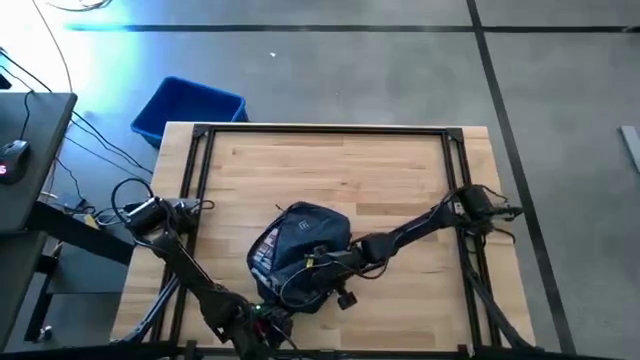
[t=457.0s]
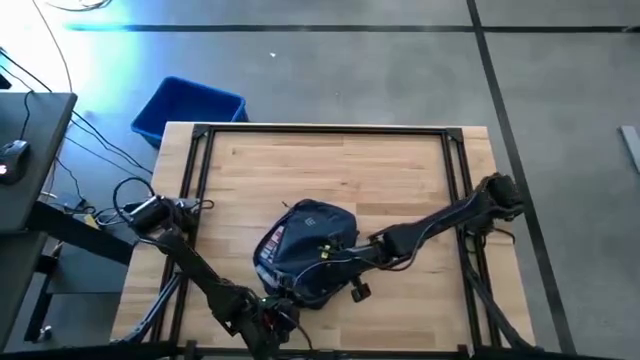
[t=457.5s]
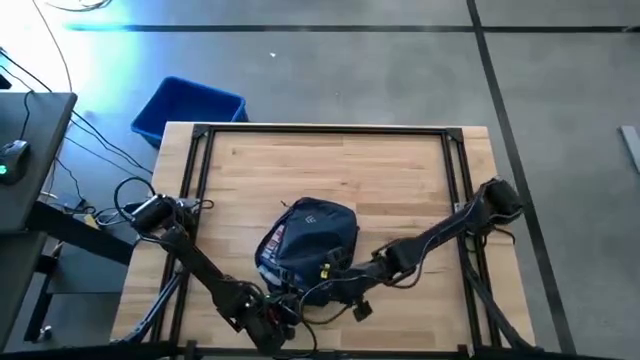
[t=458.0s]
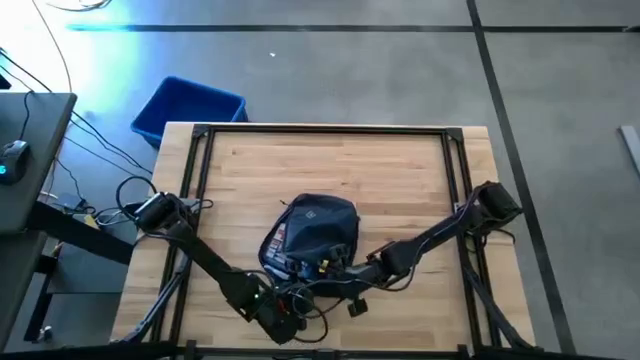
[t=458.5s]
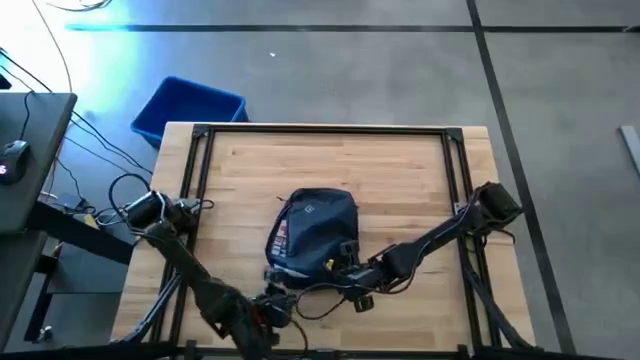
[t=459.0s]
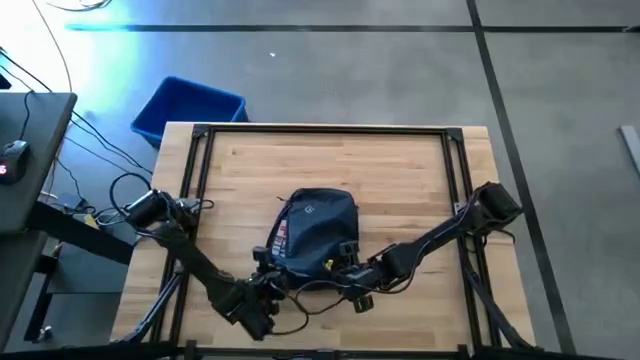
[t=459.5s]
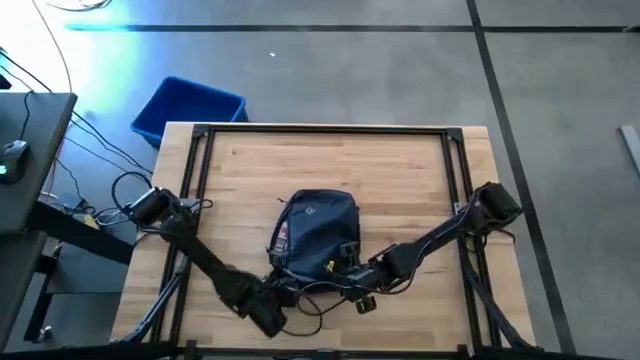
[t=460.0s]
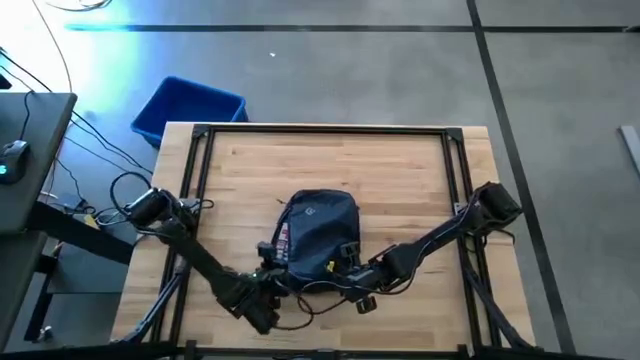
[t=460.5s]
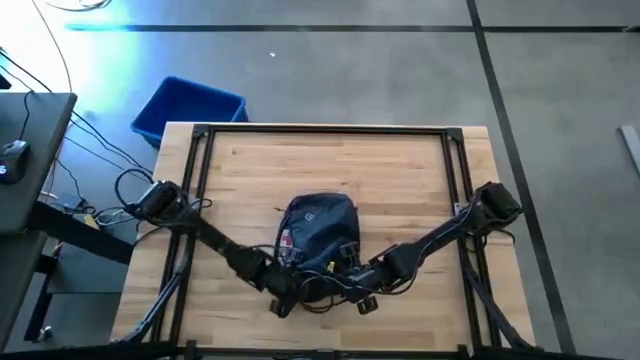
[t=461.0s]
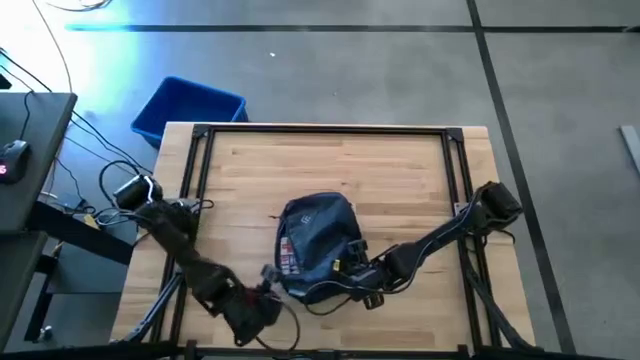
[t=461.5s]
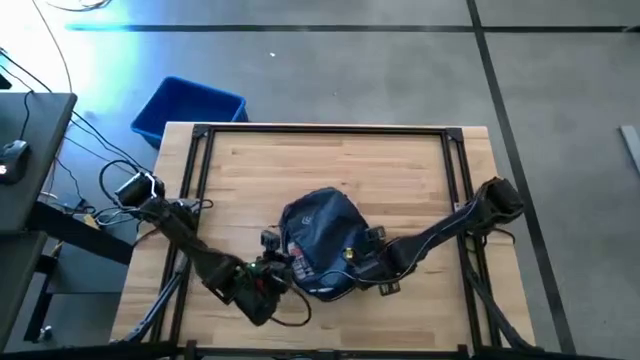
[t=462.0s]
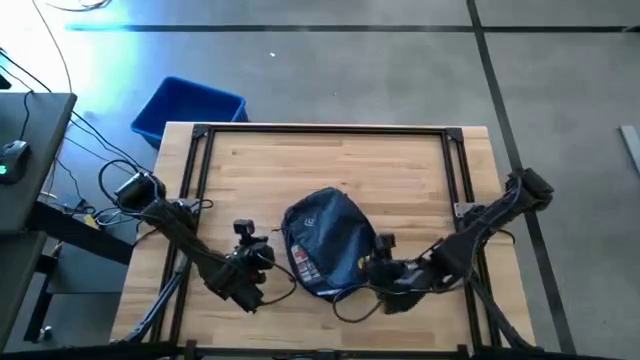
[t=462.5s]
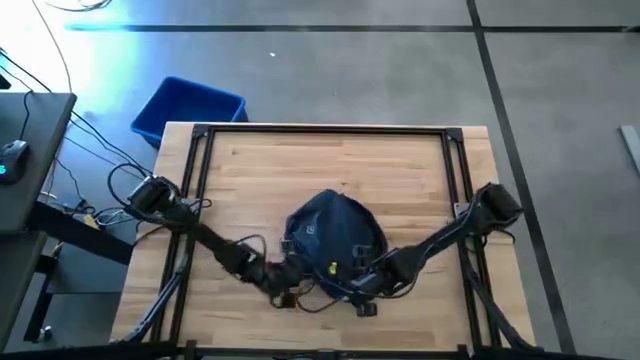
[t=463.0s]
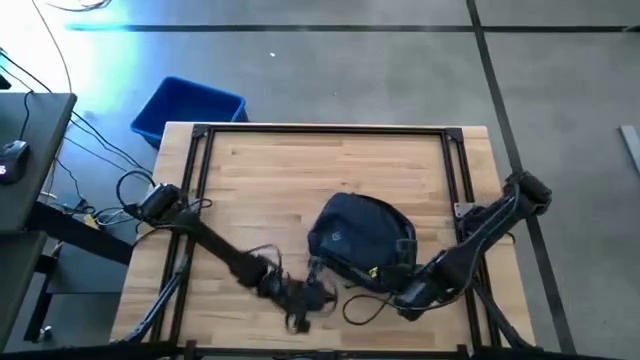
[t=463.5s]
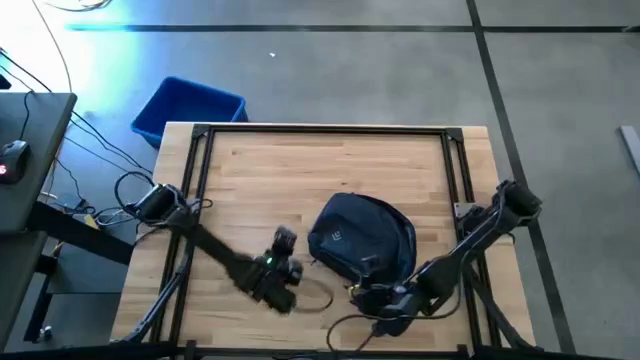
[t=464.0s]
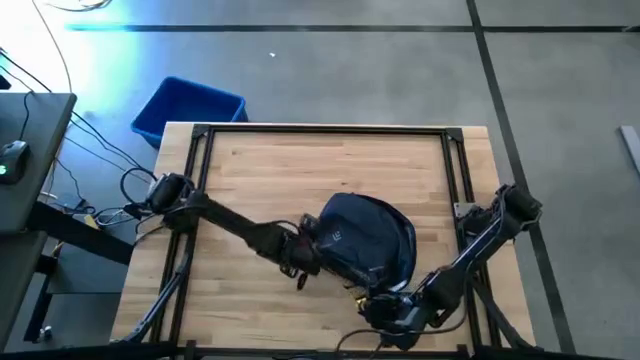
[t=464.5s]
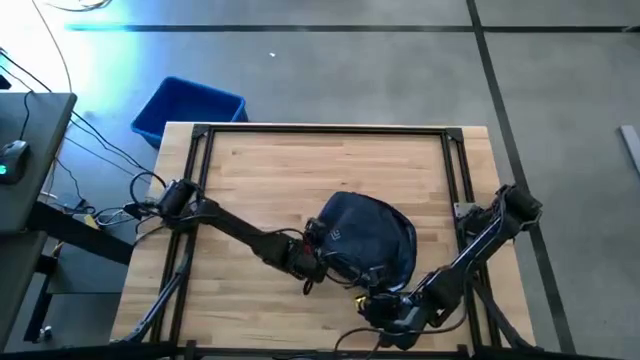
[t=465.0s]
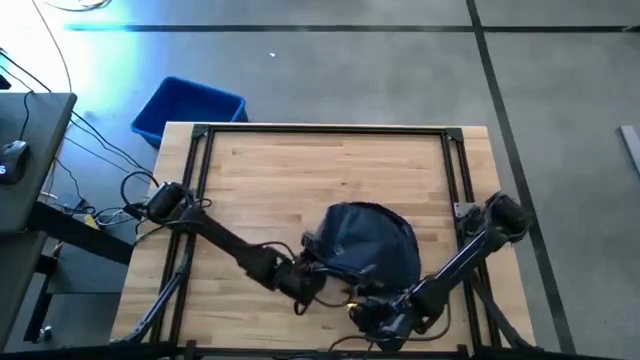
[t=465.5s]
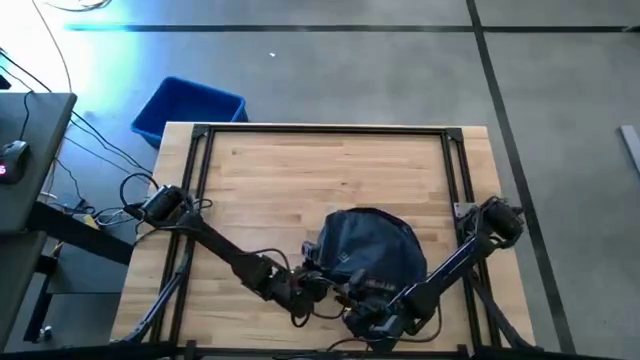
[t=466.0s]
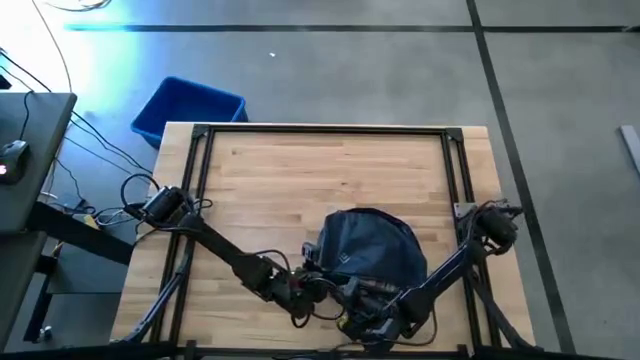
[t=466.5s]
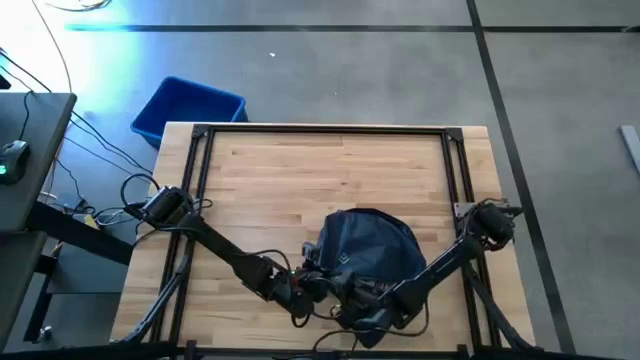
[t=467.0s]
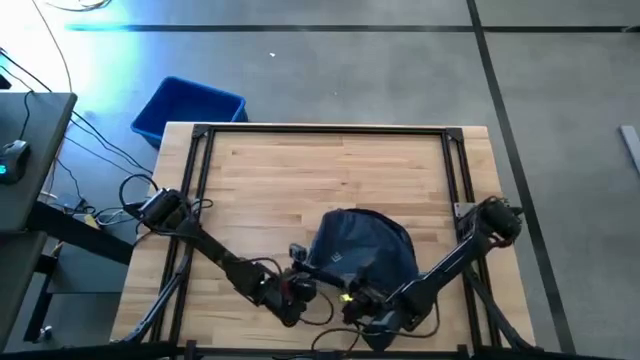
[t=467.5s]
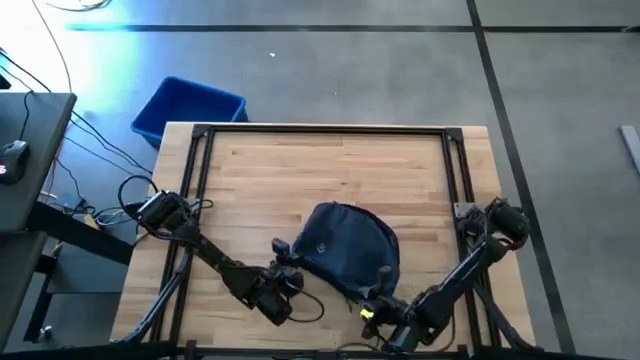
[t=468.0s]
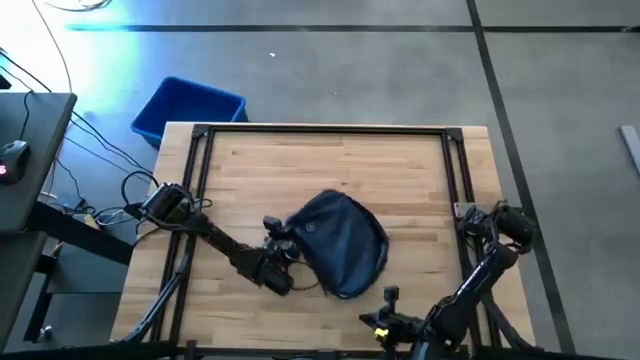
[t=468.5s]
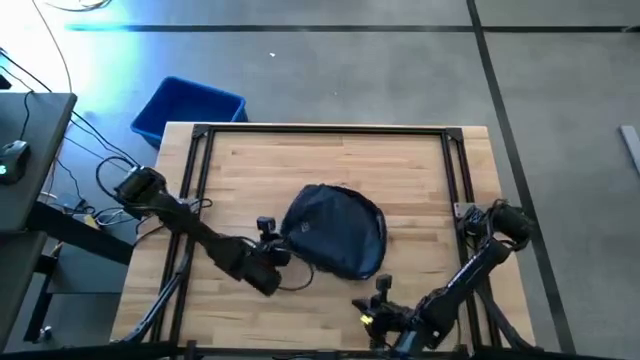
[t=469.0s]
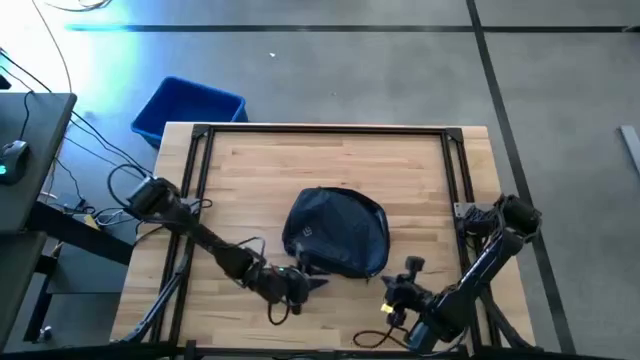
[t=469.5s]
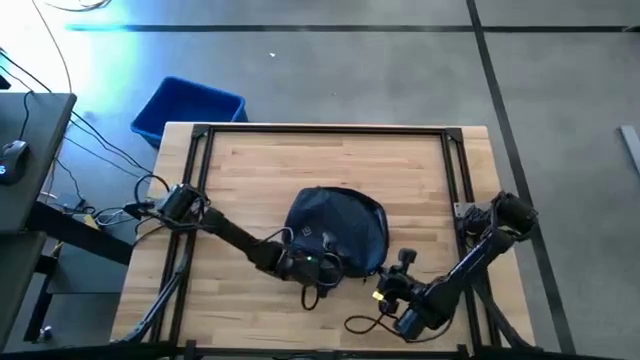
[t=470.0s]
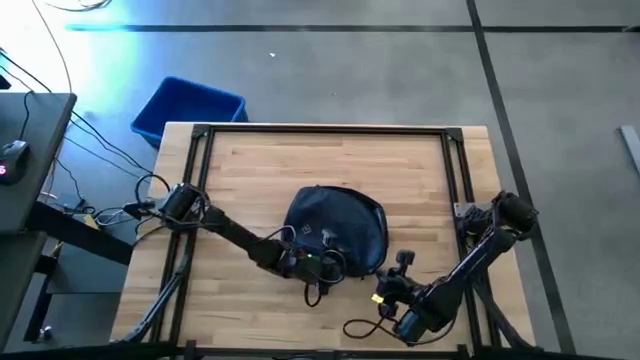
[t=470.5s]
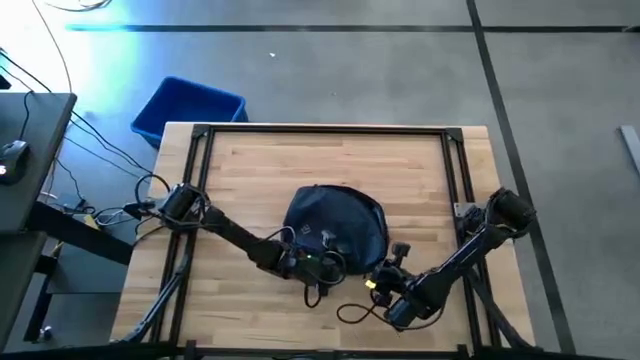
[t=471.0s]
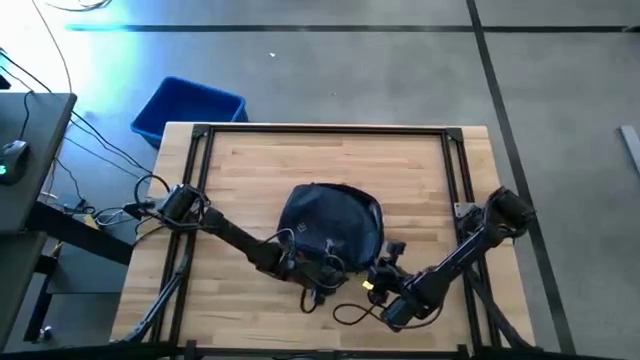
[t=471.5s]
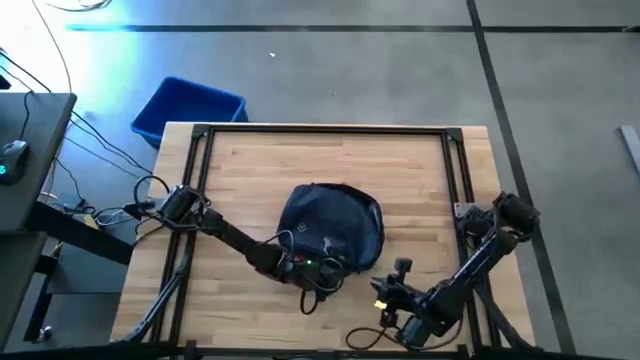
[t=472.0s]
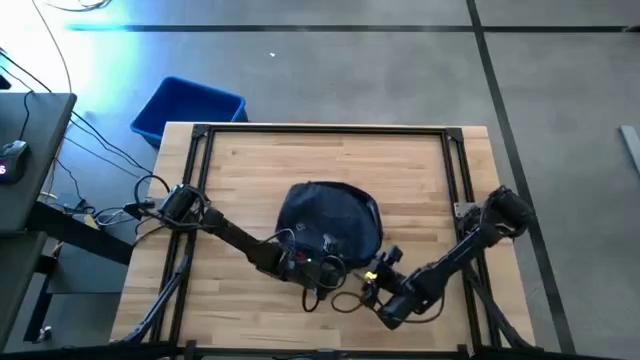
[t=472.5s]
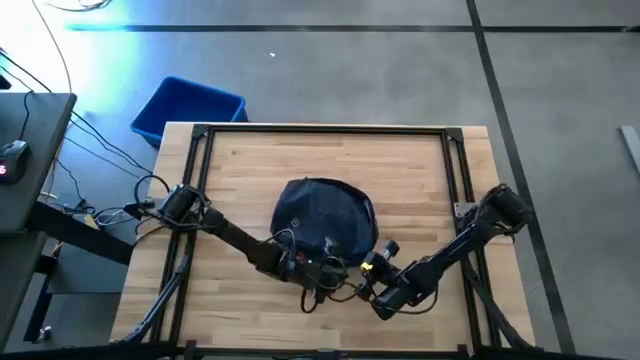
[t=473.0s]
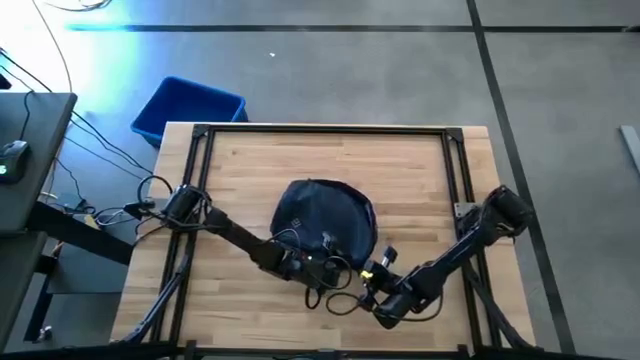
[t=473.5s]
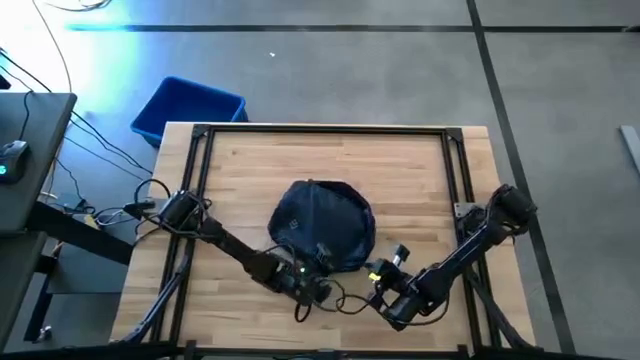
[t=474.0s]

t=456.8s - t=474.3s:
Task: Unpack backpack
Close the backpack

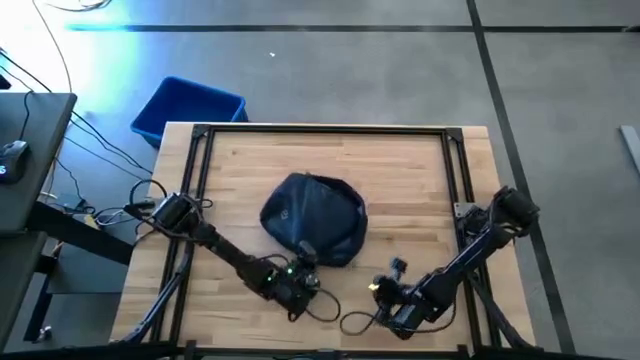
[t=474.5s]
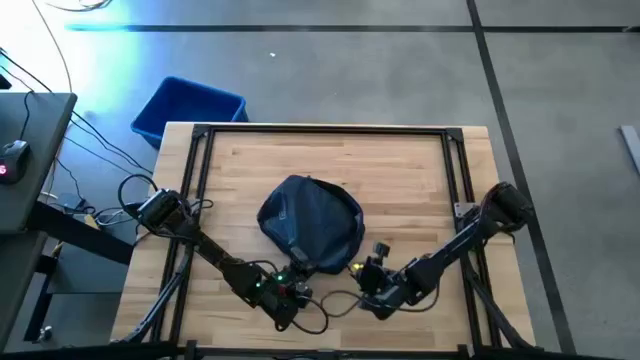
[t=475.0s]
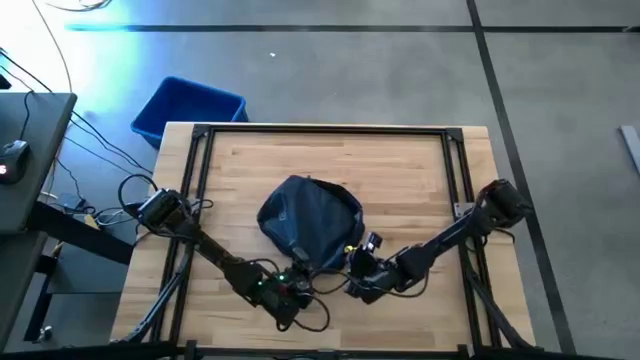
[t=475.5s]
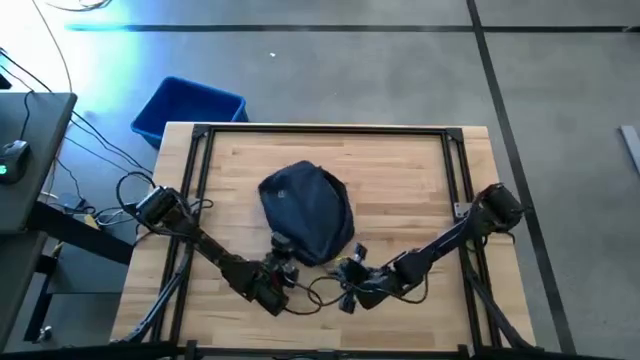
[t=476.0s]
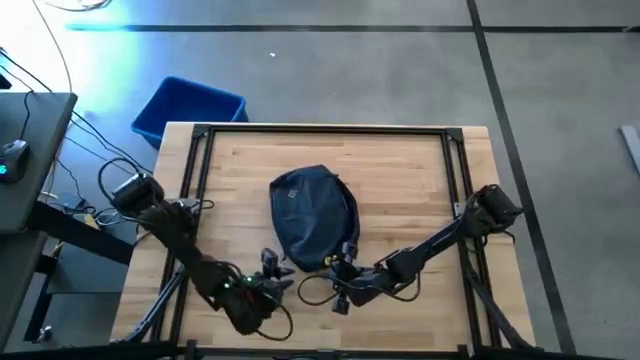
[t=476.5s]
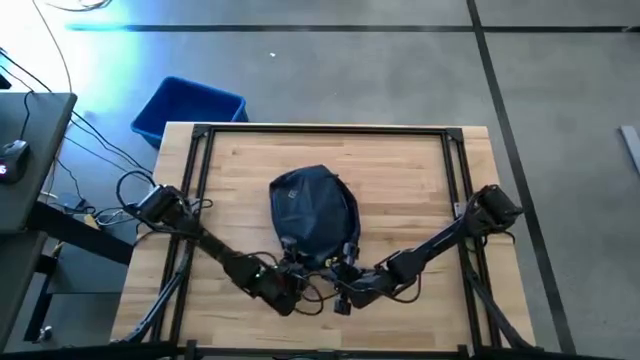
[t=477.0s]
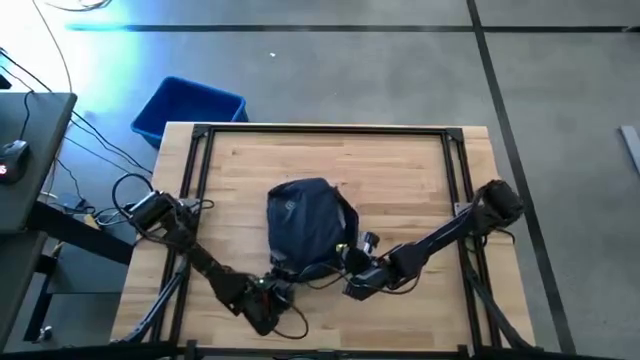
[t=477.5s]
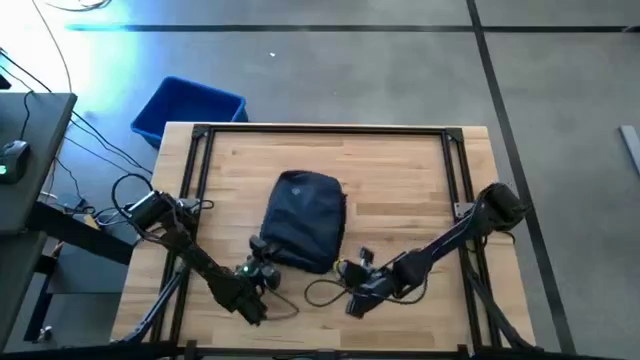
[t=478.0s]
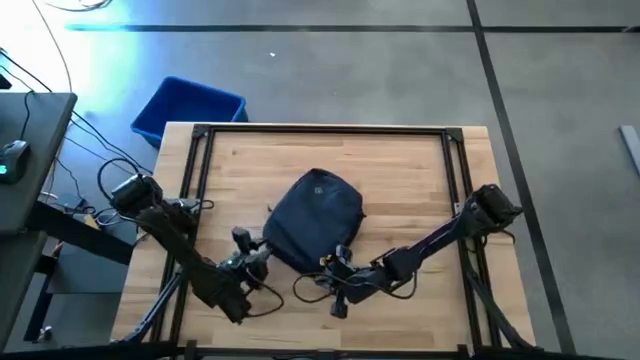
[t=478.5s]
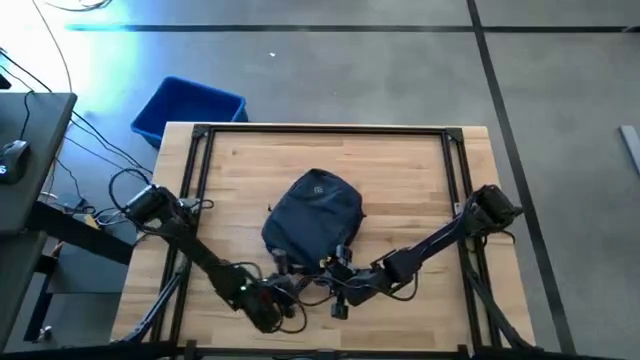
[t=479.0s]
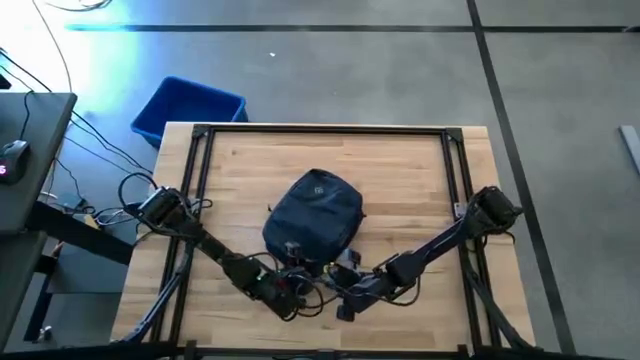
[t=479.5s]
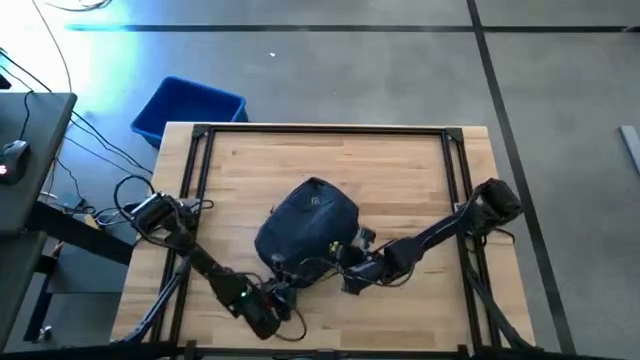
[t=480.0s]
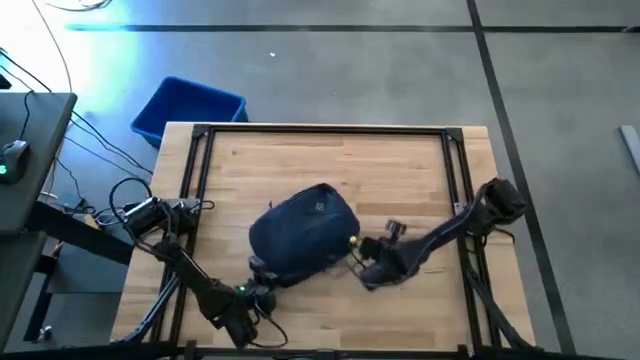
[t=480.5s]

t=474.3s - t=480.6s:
Close the backpack
